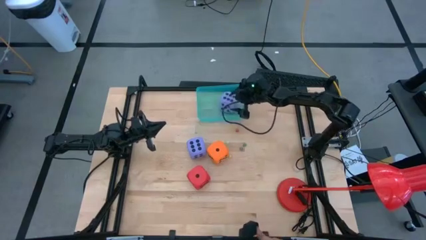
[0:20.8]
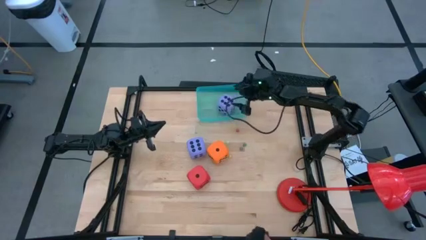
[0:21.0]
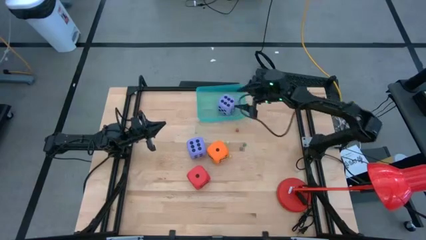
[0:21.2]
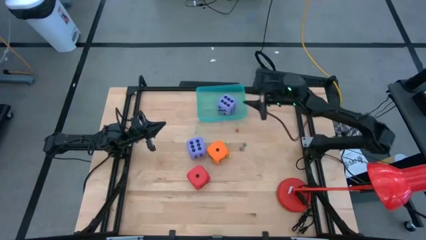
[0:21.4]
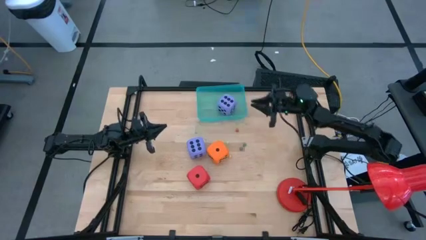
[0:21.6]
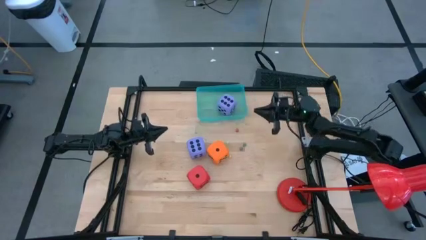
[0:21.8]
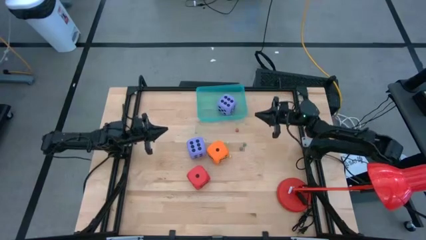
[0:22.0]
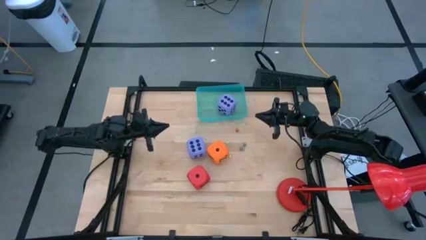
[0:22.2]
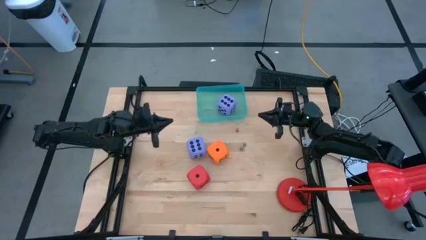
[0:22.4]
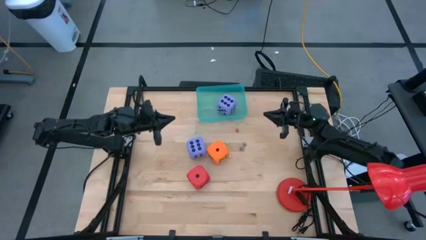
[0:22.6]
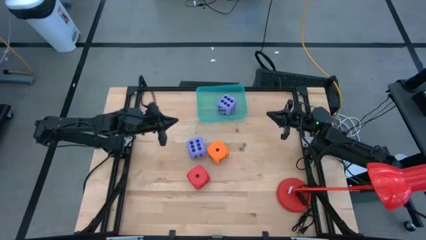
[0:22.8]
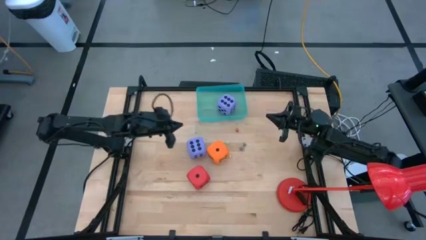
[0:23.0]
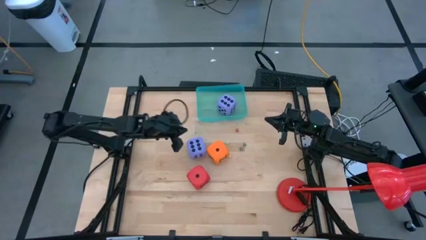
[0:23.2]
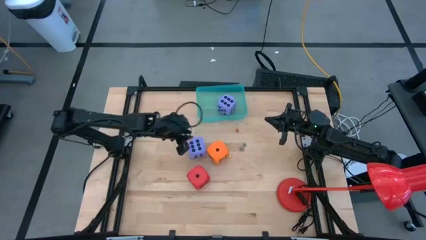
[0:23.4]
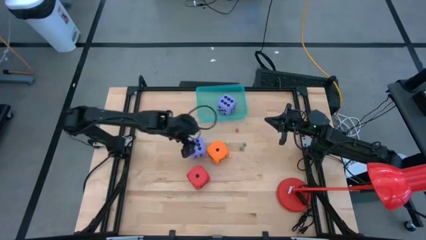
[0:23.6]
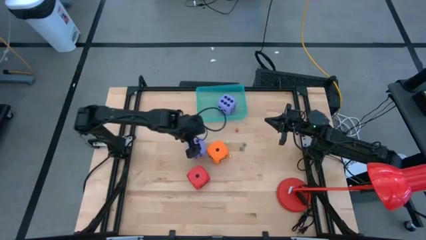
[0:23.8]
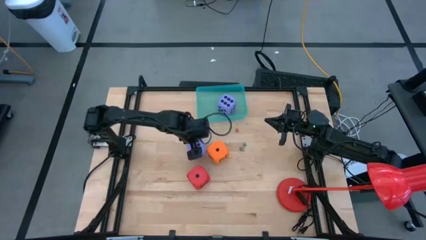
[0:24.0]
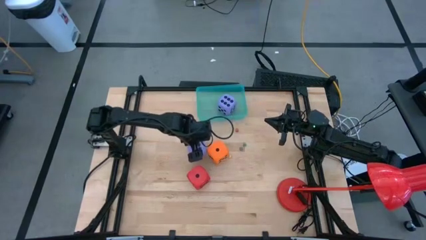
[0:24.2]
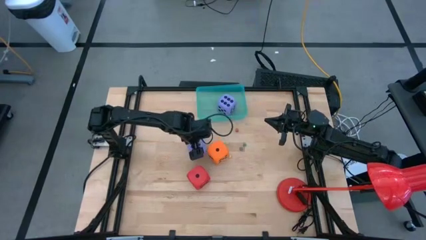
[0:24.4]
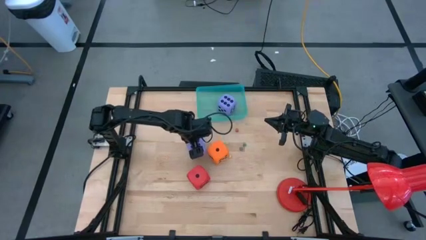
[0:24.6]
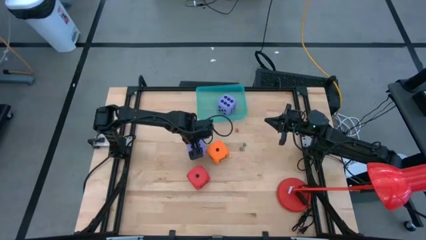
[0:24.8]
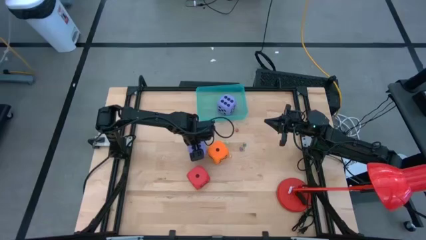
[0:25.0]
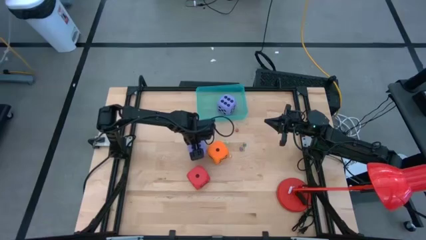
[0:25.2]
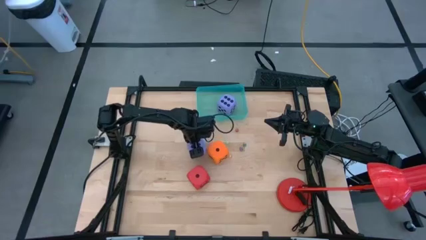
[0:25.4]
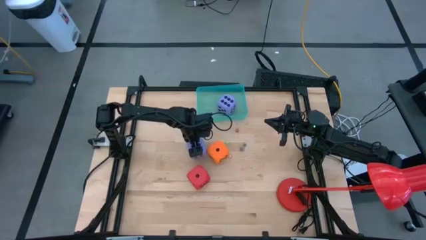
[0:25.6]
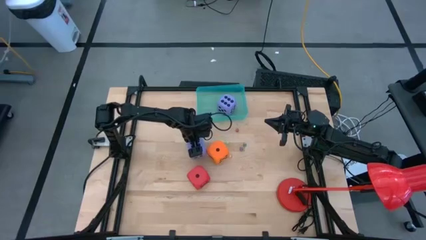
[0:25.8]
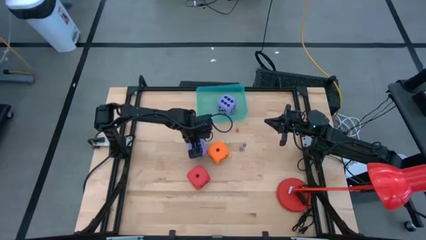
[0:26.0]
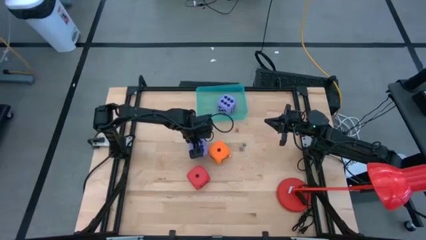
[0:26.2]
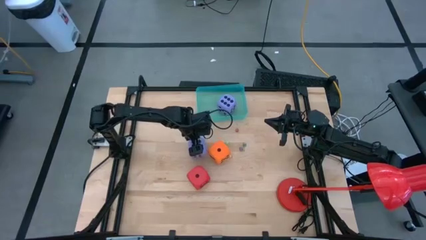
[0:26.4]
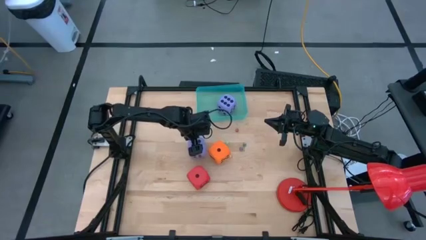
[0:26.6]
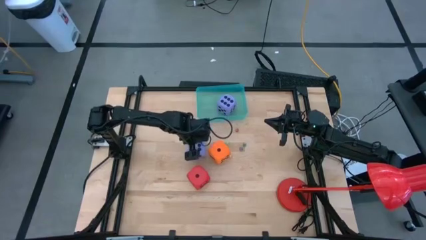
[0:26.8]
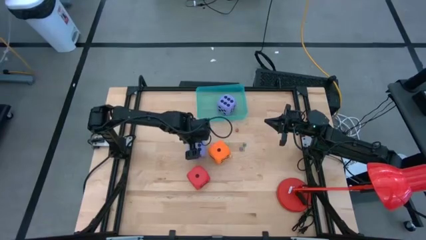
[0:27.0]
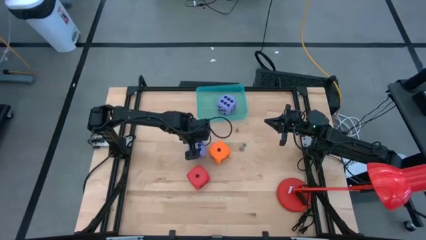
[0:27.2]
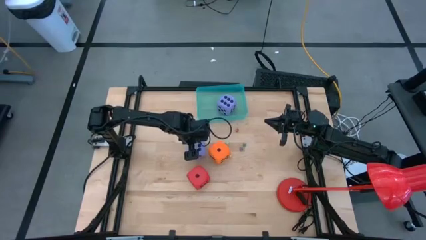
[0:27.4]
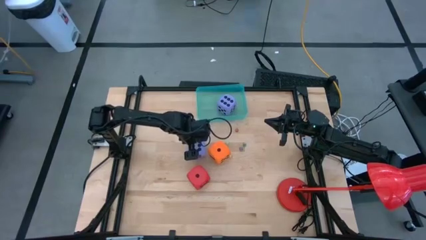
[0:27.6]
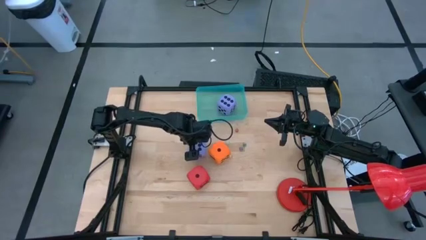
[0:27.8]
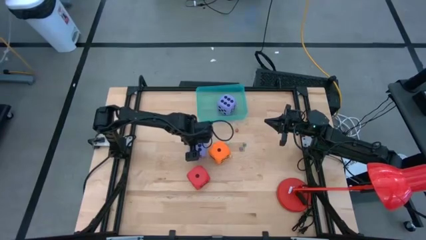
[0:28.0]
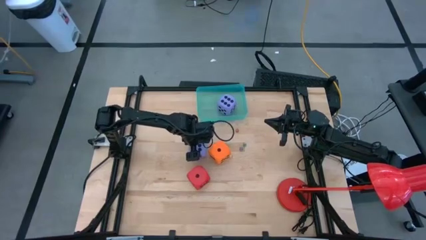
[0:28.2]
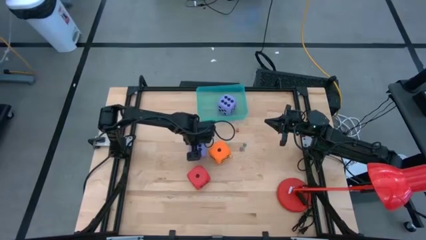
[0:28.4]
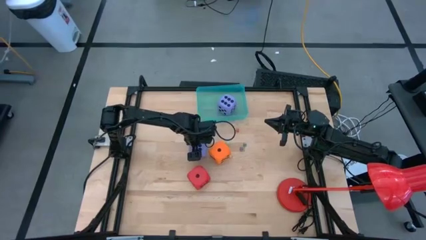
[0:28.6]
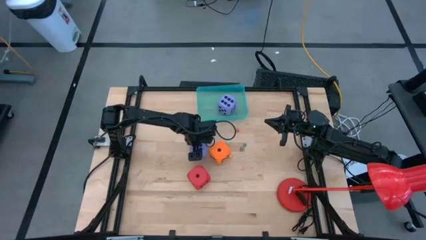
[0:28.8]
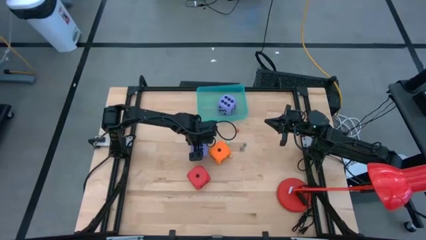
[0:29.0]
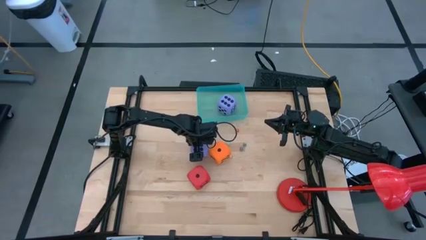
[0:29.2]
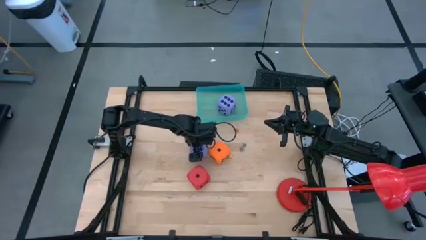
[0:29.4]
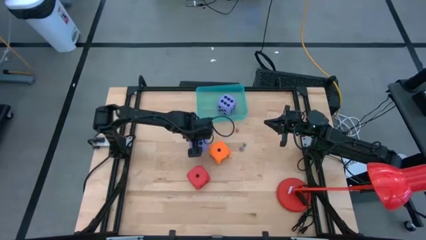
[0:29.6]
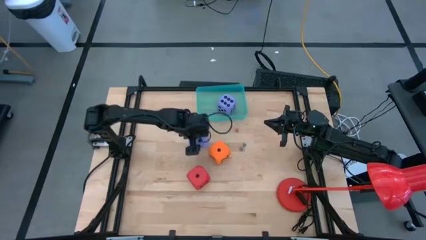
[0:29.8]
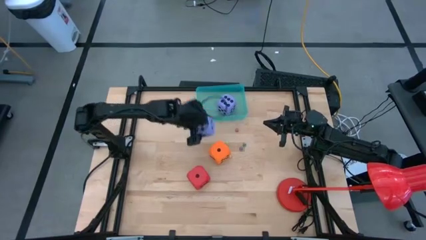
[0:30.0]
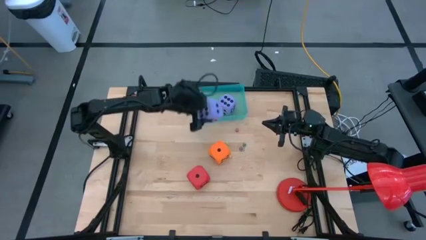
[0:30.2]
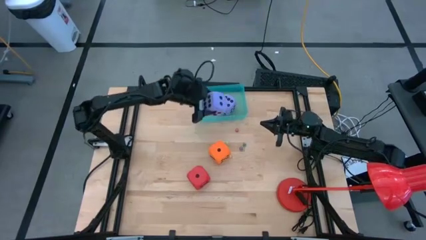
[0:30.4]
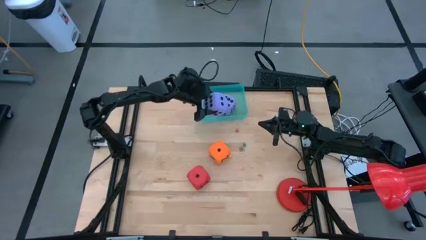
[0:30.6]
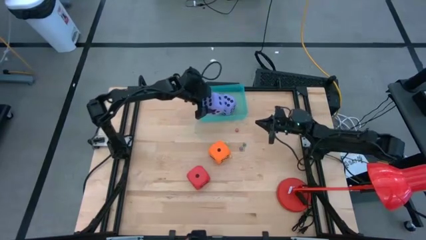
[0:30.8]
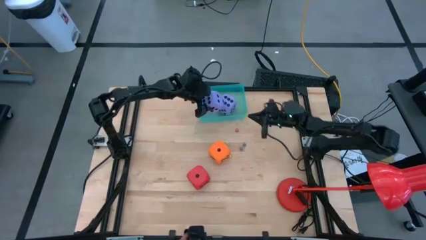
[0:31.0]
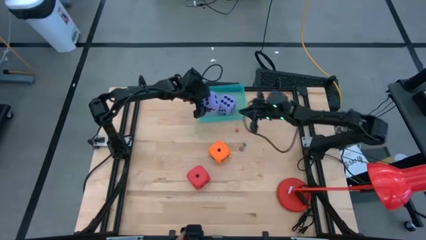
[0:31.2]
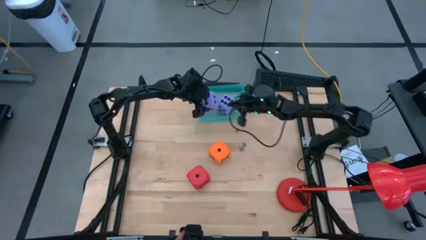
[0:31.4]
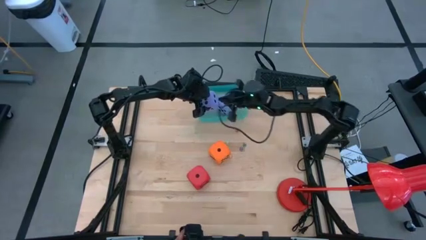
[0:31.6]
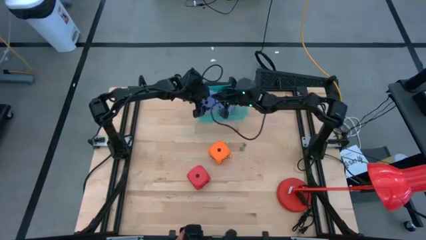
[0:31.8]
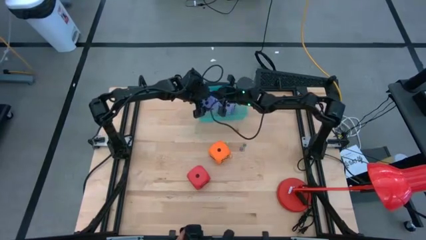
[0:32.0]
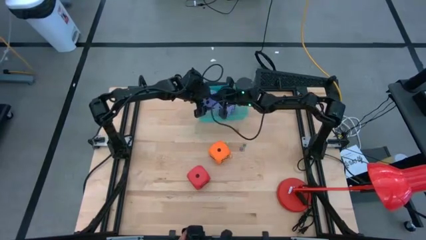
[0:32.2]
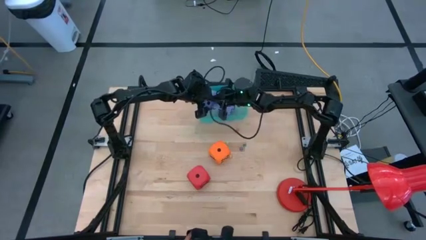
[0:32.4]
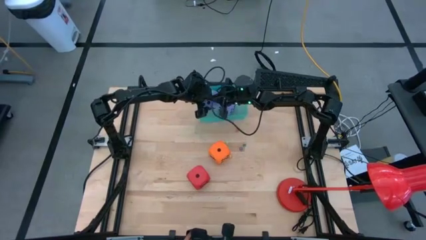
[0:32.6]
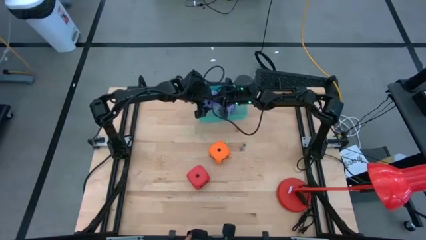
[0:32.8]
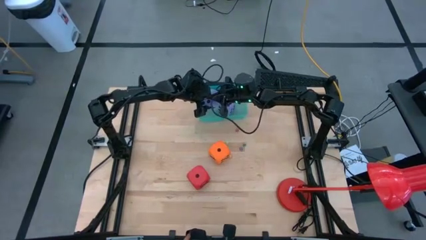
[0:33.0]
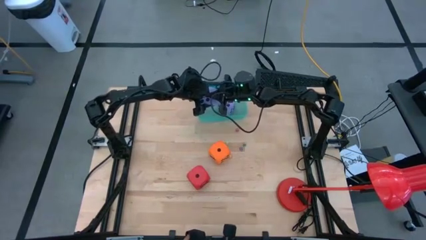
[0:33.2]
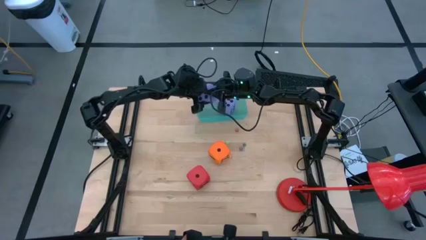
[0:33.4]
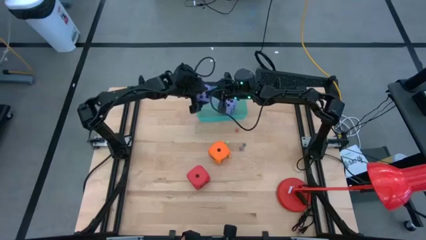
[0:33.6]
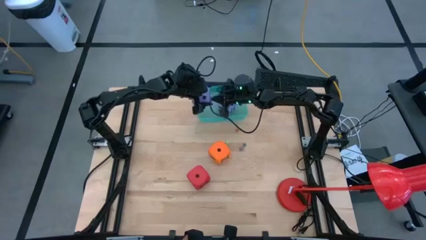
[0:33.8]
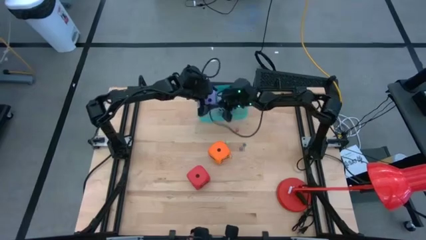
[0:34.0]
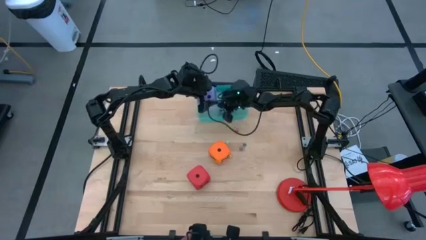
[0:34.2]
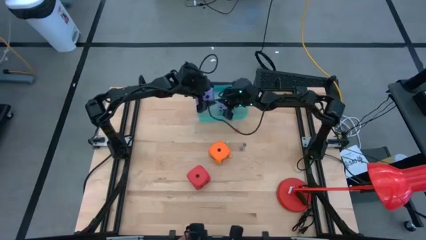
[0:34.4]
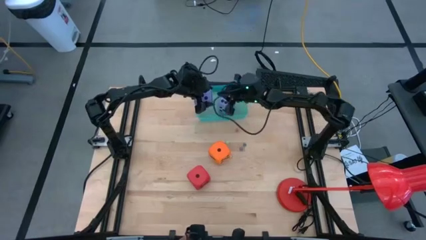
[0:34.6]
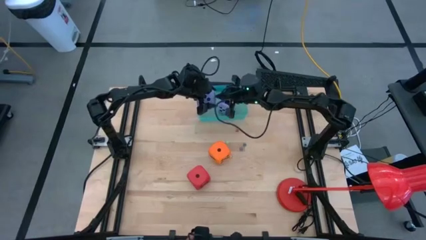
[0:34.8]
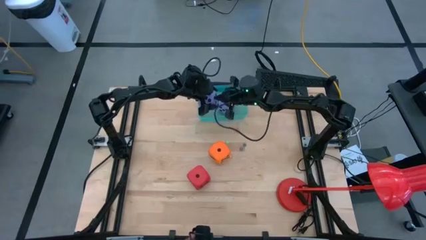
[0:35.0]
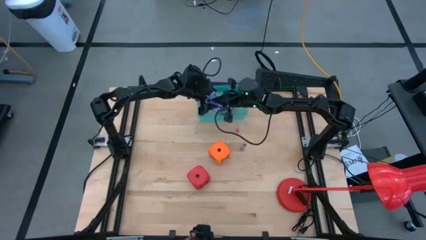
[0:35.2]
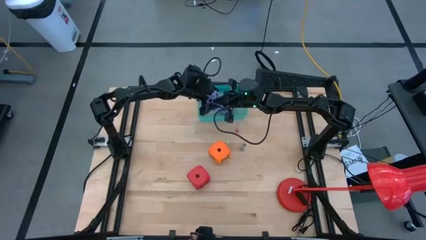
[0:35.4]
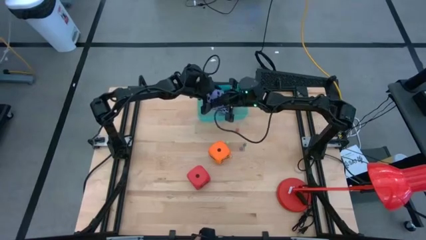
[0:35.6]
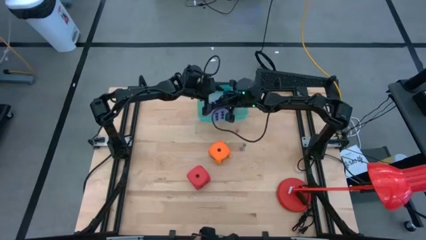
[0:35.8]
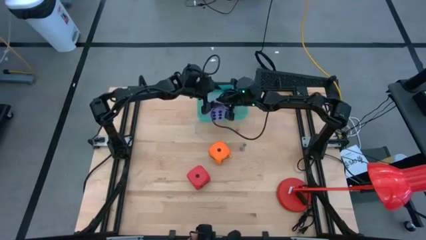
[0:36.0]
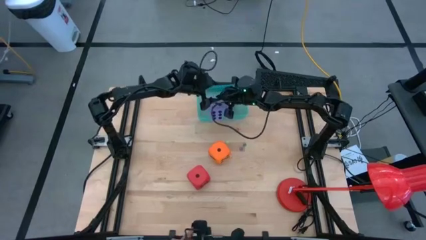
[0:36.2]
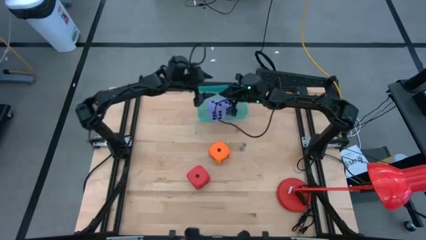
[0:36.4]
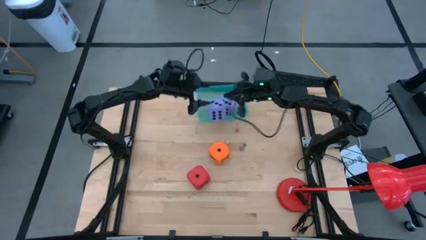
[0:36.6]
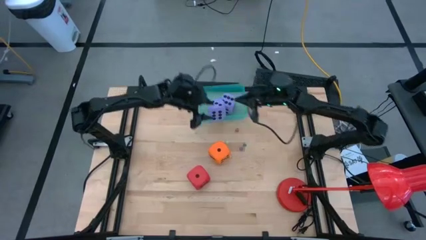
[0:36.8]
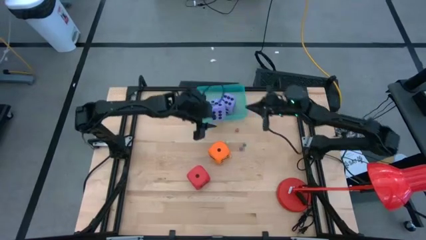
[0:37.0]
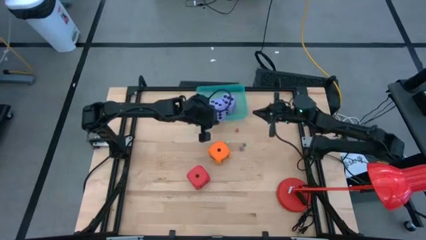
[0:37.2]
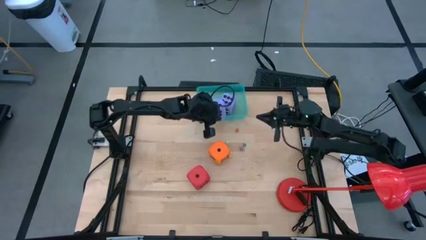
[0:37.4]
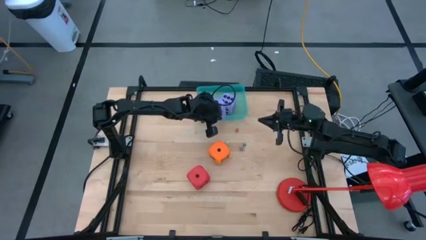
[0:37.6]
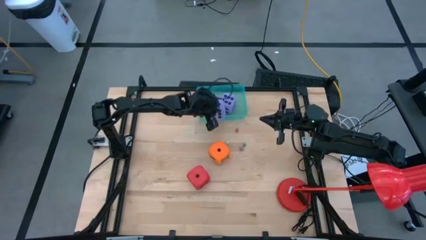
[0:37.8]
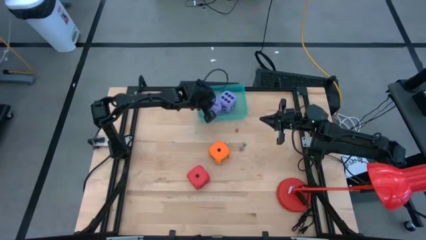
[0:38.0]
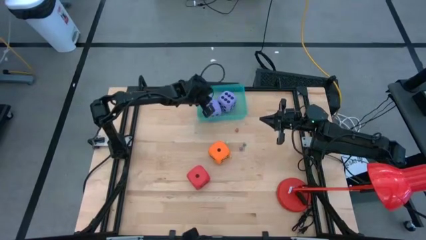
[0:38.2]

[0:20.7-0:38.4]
Task: Pick & Place Dice
Put the big violet dice into the green bin
